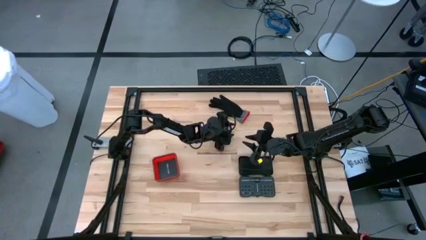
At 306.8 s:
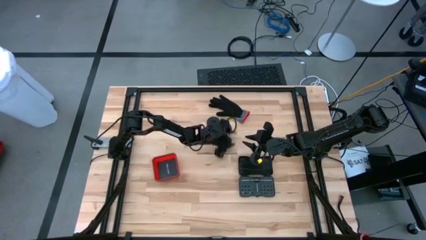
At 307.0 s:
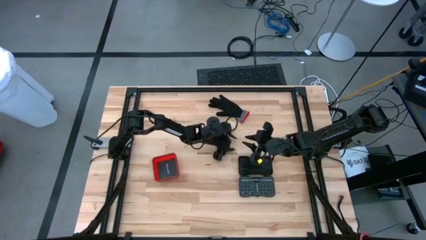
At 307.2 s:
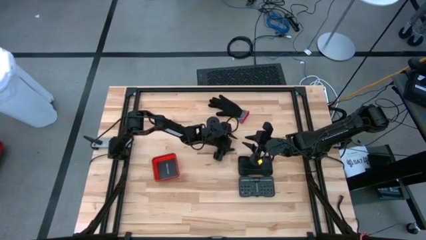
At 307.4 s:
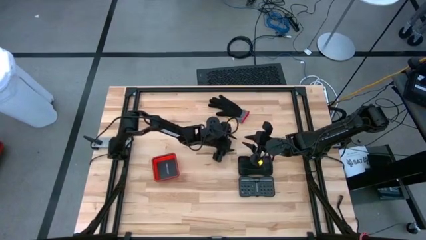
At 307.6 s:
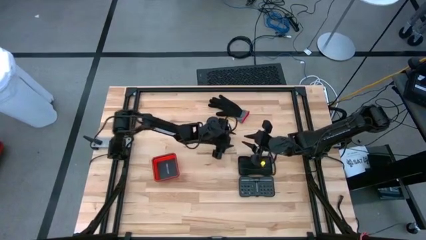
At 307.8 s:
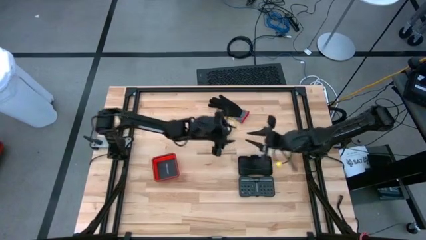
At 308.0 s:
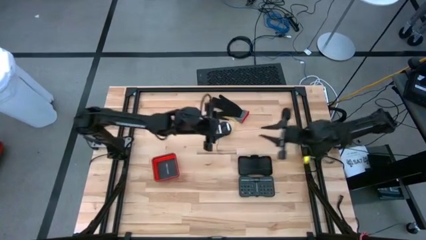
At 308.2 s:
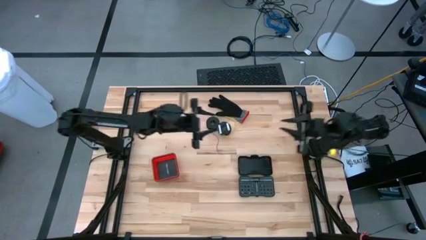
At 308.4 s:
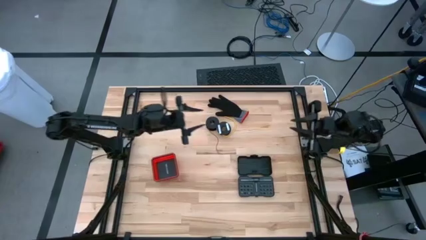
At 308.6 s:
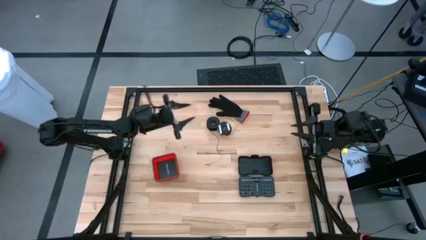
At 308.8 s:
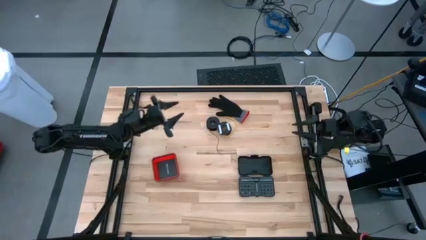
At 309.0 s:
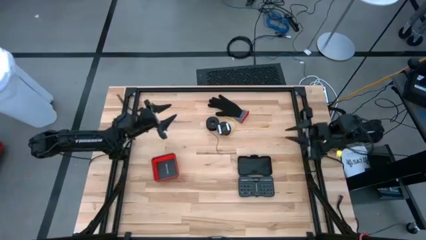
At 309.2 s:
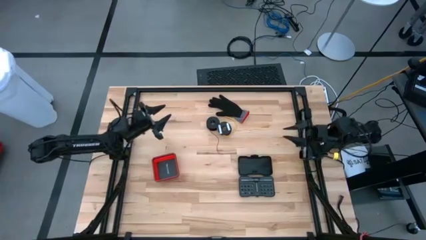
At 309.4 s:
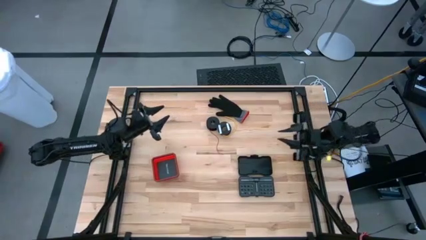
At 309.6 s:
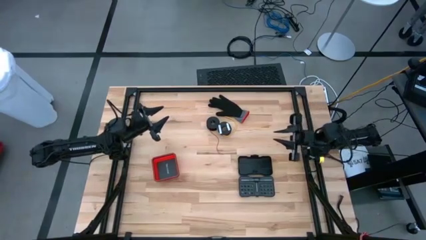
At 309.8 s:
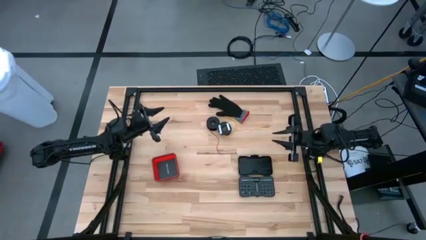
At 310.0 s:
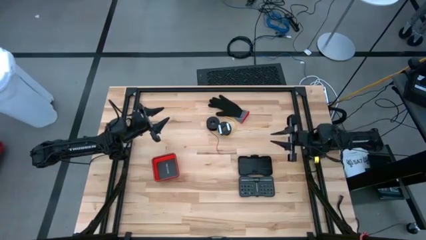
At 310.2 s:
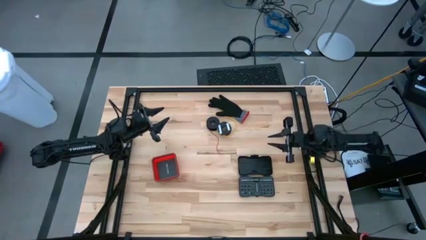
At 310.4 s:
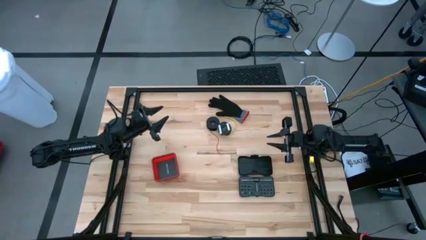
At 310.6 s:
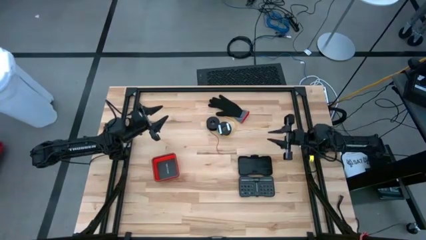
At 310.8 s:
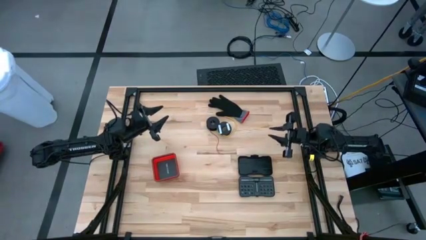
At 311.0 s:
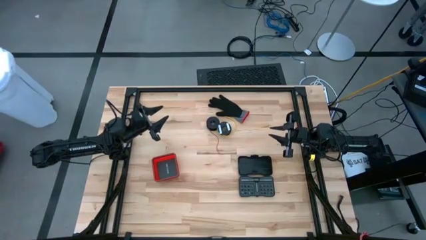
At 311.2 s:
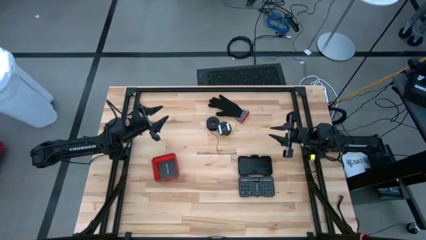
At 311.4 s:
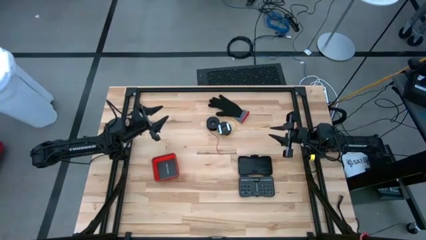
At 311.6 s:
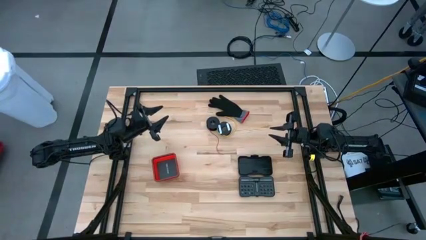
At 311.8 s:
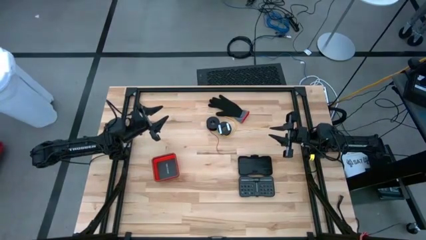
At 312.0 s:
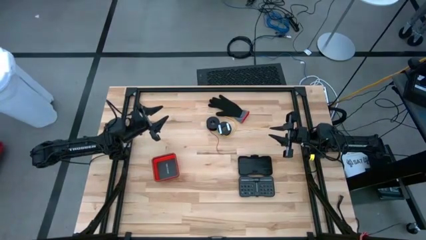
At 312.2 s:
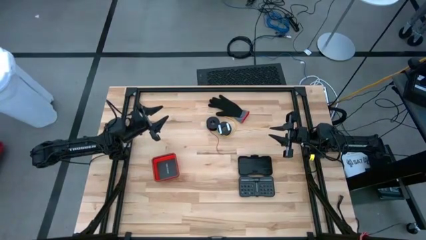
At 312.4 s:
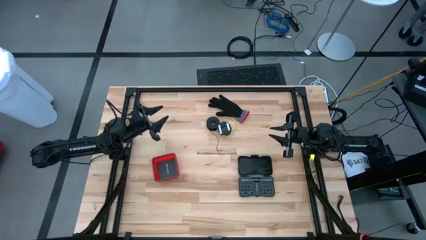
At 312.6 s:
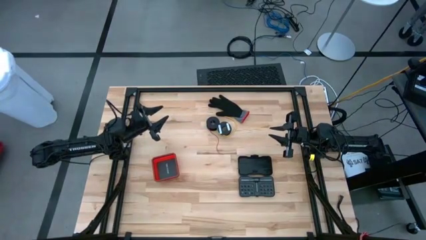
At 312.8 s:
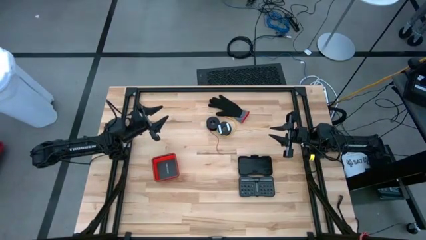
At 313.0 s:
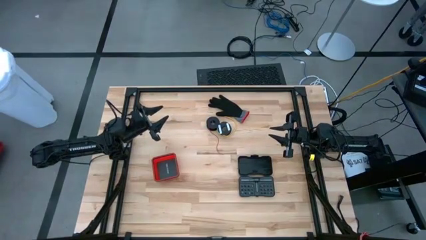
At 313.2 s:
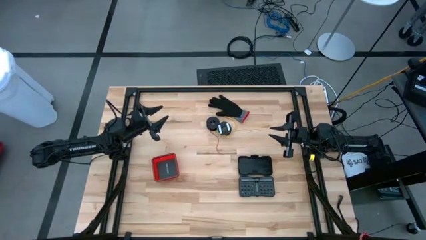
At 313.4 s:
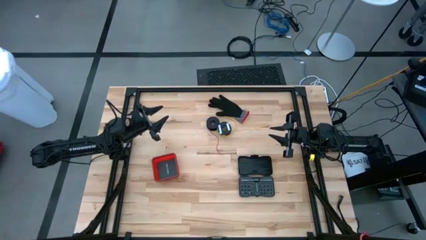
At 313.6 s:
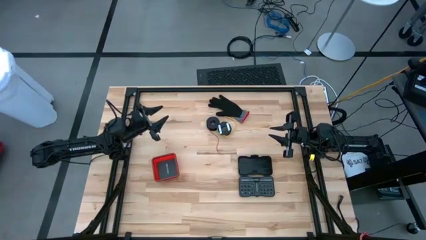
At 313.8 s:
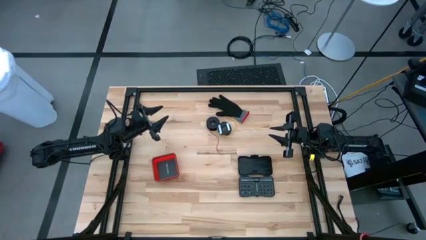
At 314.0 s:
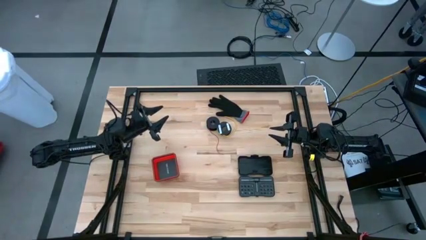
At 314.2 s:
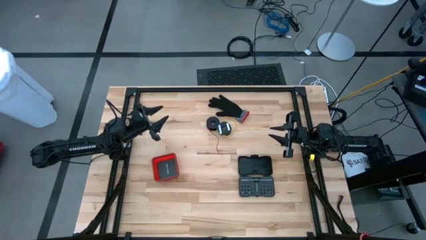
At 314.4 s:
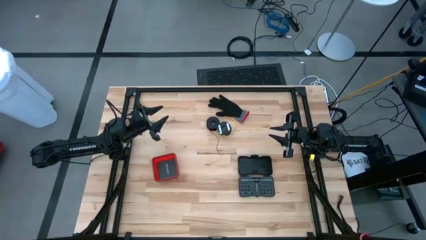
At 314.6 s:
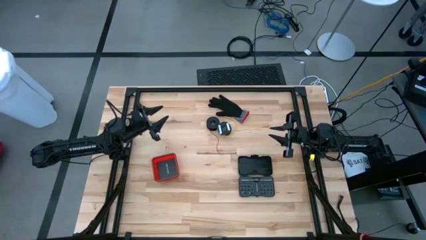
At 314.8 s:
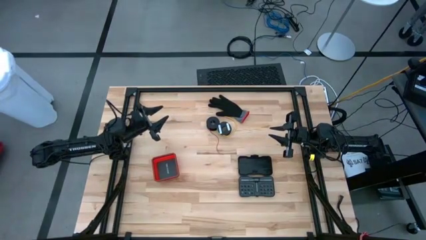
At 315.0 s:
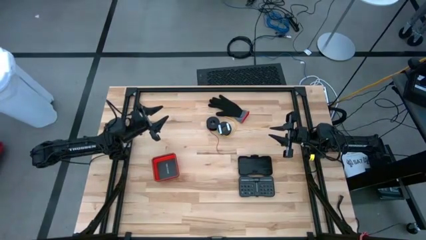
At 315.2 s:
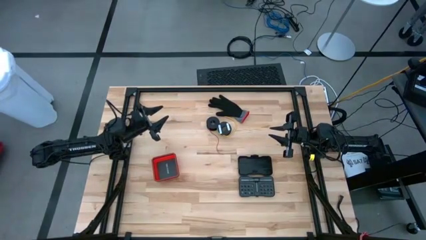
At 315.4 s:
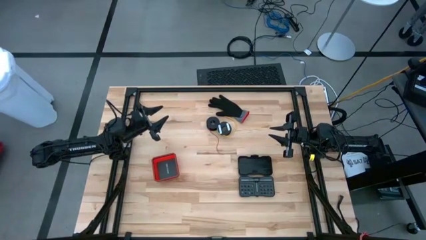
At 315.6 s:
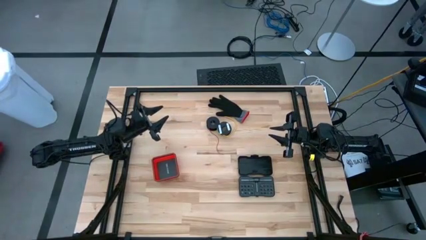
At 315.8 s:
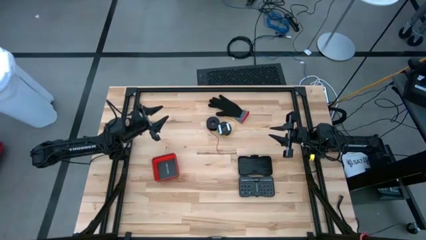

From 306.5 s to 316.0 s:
Task: Coil cords
Return to Home Position

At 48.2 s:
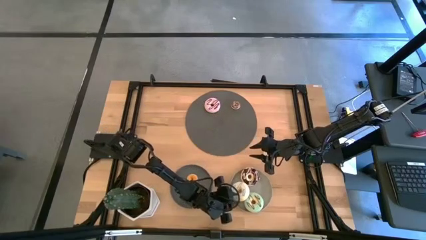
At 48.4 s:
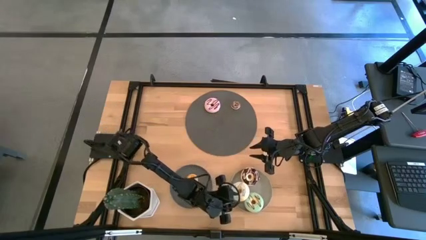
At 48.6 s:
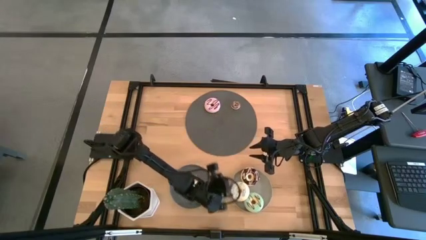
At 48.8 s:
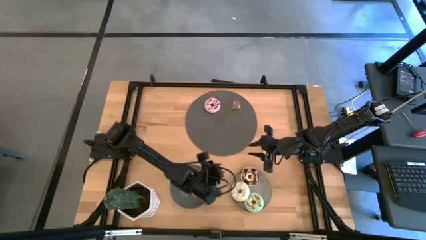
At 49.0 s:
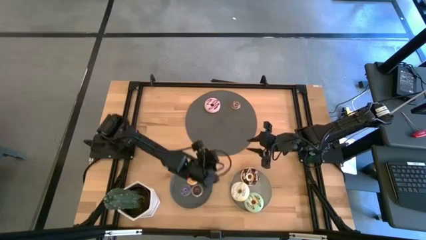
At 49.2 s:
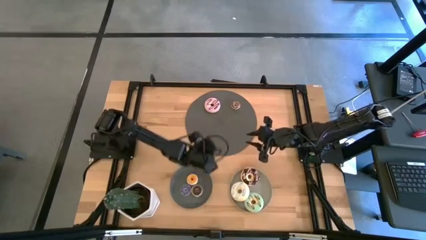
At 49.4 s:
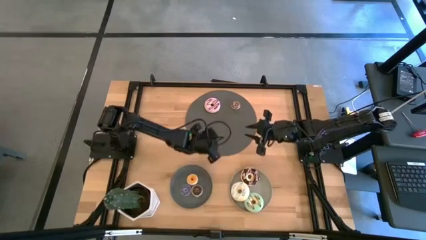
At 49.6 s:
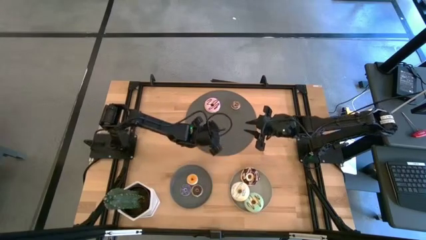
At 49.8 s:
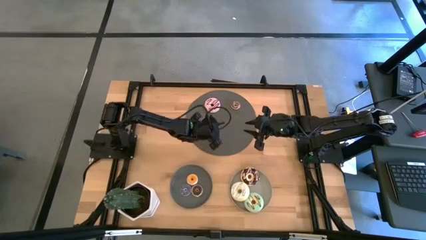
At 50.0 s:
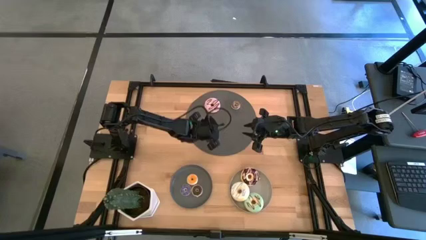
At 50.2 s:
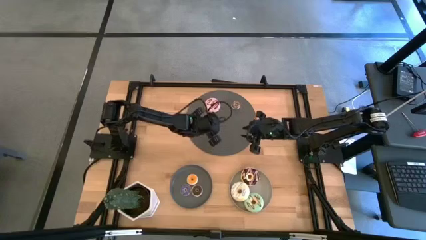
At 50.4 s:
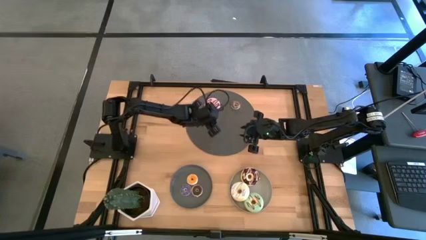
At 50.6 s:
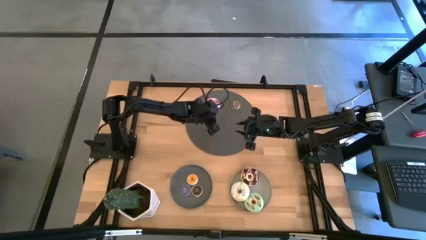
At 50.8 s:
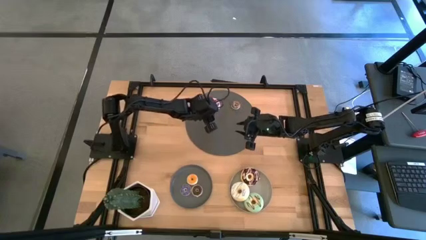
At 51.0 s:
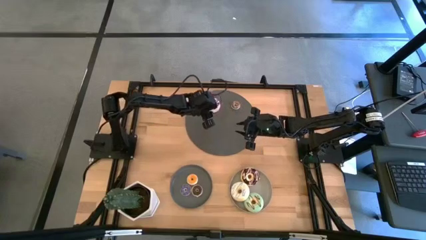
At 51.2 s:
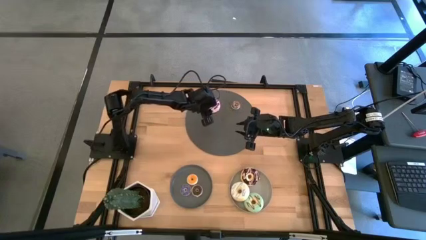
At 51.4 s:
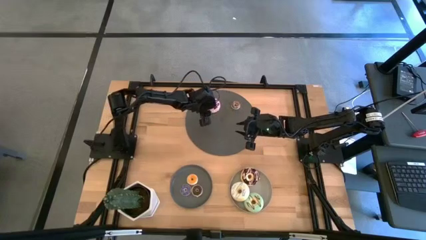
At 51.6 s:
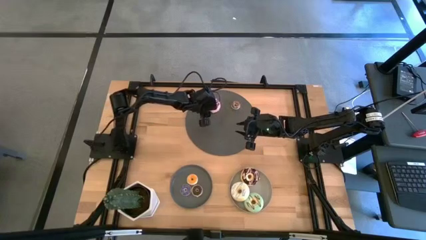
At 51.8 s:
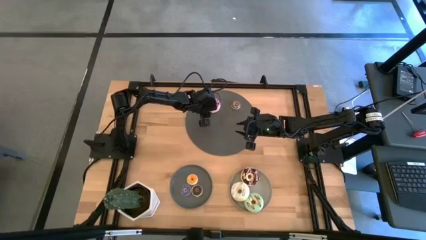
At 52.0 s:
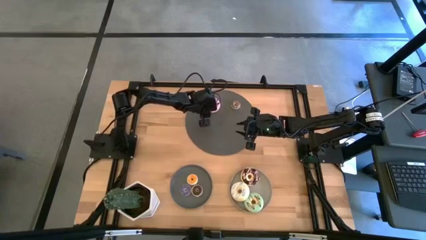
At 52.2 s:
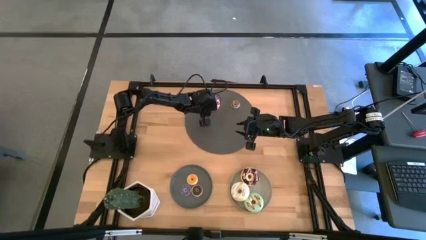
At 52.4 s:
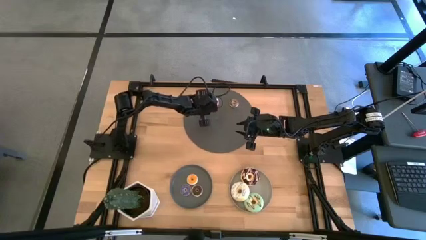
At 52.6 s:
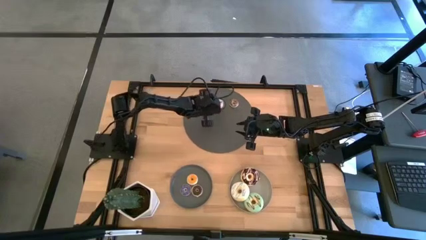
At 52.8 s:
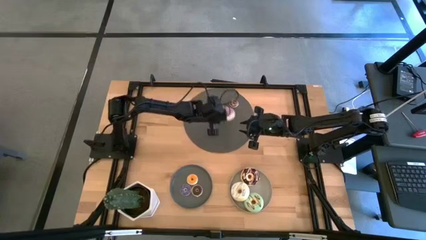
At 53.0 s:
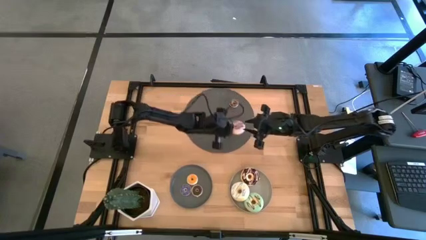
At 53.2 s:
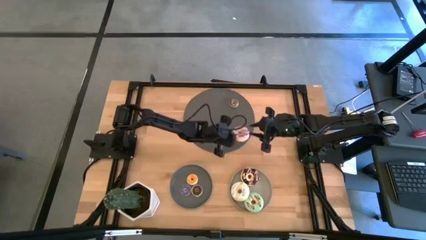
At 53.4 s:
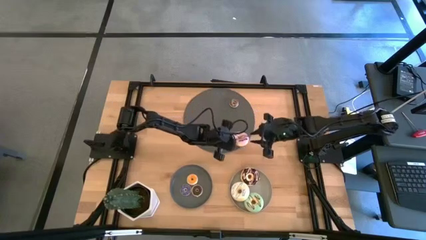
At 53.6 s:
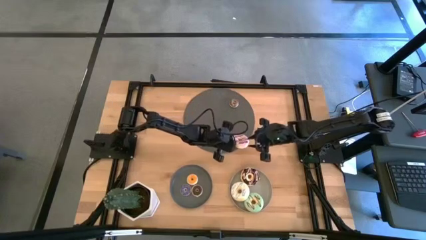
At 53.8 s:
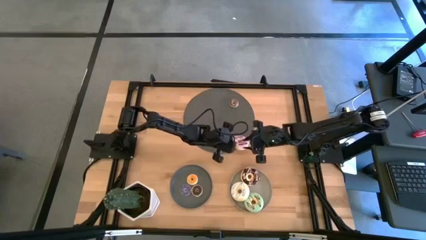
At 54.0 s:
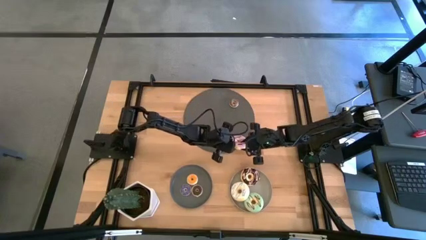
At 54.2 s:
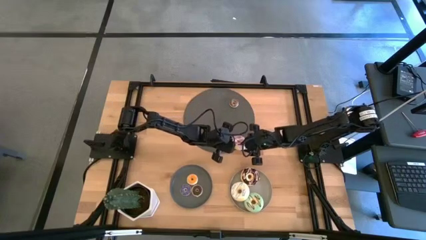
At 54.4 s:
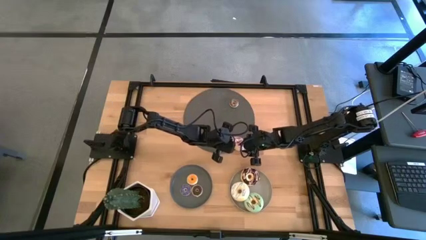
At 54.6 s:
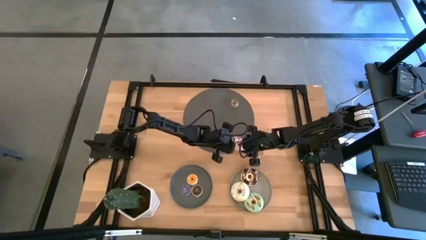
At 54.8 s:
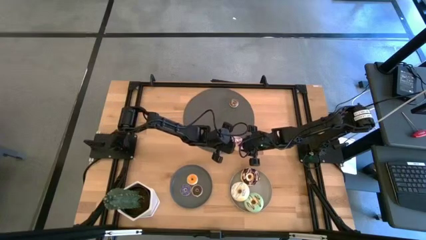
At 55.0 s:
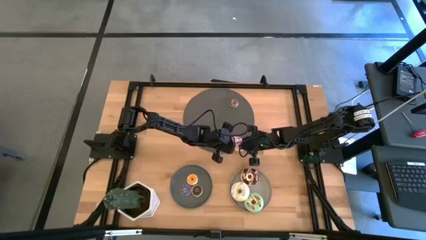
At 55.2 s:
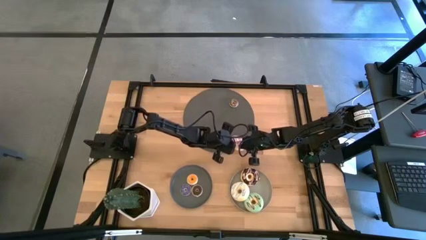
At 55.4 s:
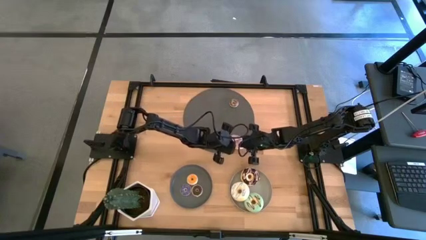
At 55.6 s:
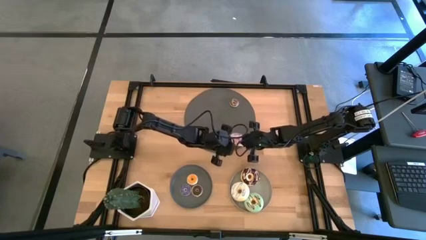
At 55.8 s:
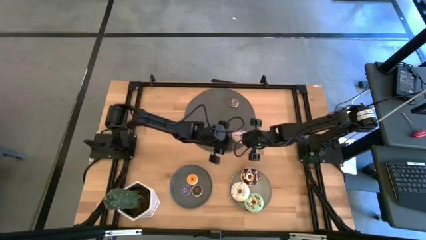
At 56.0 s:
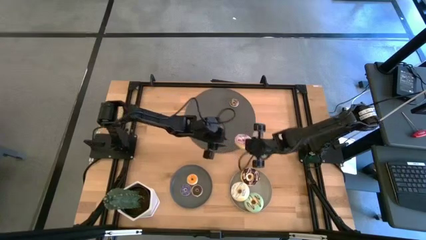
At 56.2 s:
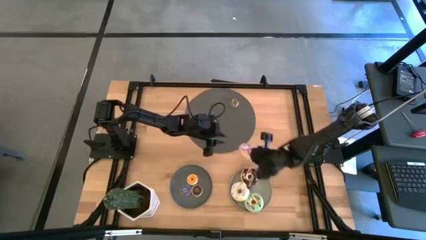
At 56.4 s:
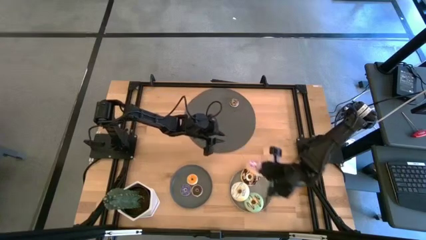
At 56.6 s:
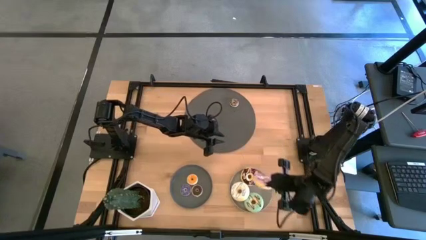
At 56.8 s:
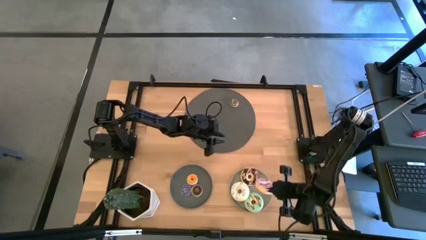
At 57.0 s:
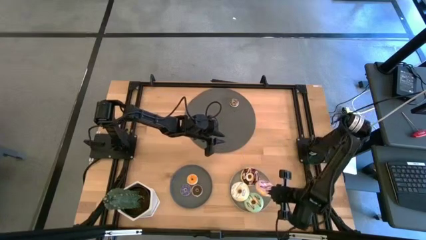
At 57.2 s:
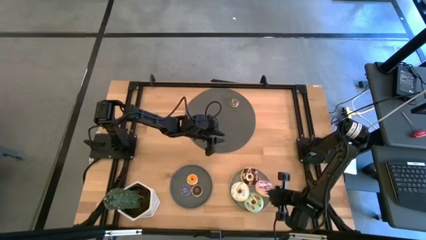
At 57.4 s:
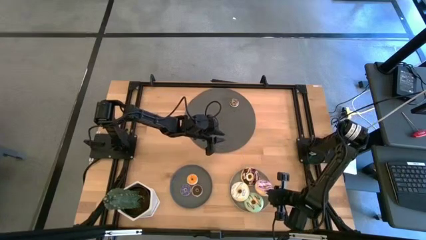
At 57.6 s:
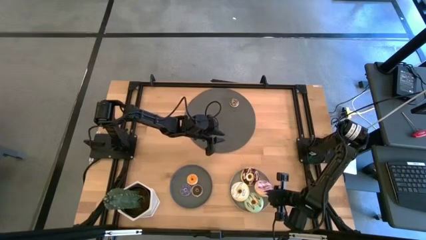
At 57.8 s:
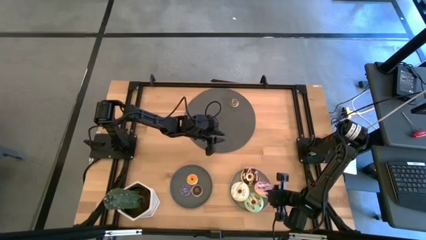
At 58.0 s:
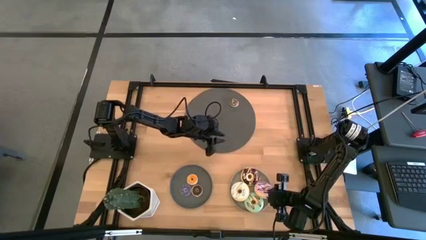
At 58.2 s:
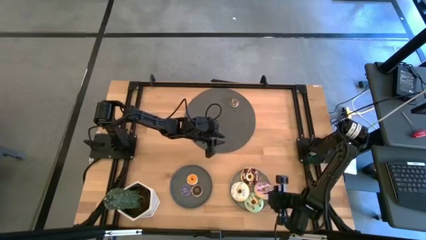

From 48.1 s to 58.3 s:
Task: Pick & Place donuts
Put large pink donut on the gray plate
